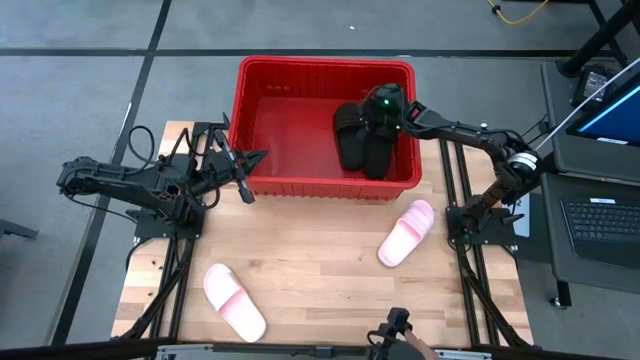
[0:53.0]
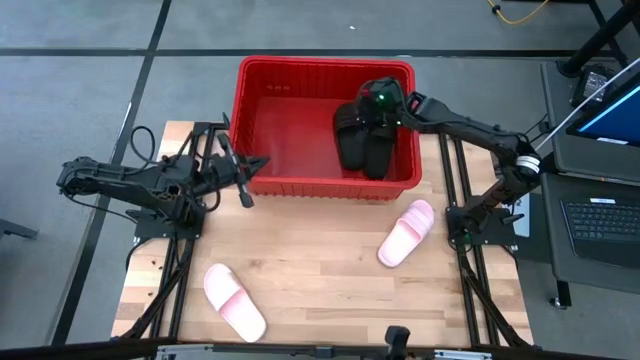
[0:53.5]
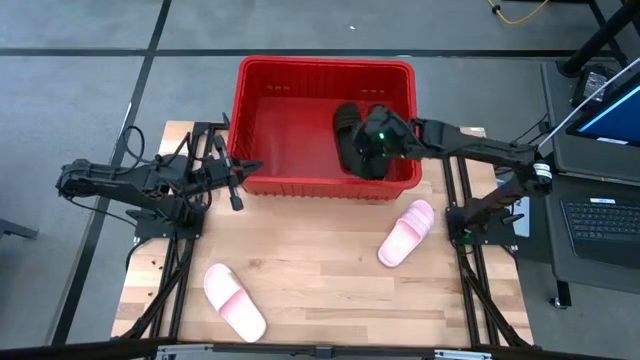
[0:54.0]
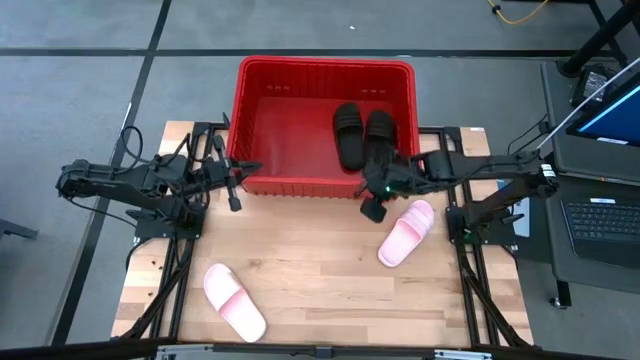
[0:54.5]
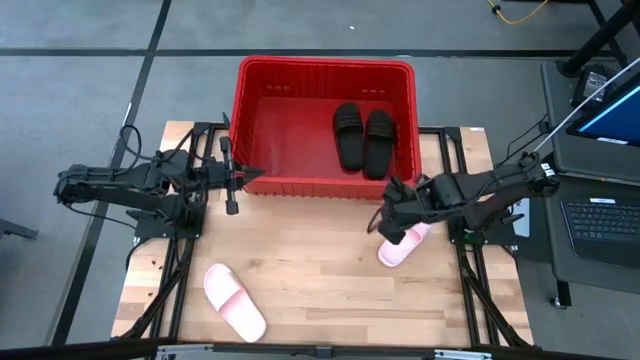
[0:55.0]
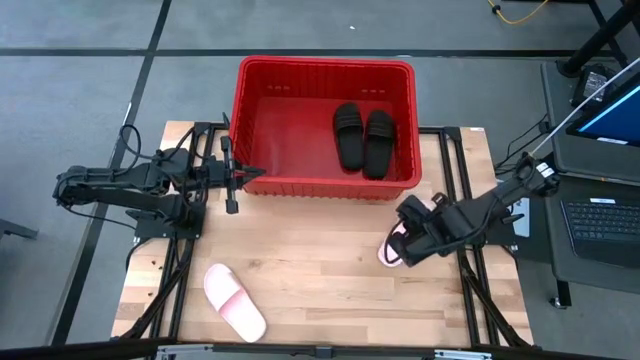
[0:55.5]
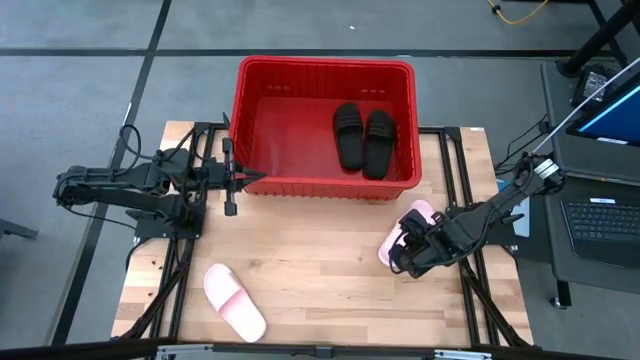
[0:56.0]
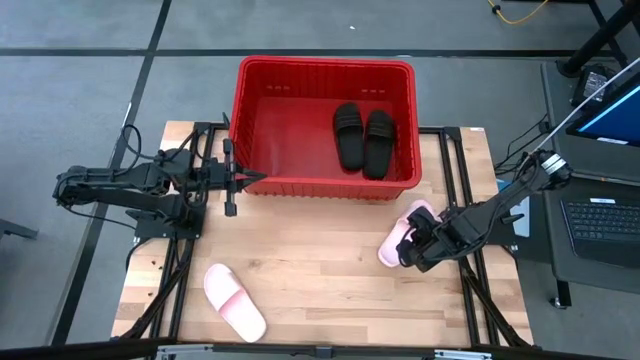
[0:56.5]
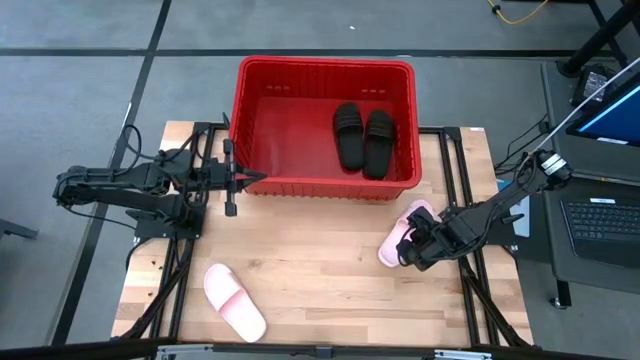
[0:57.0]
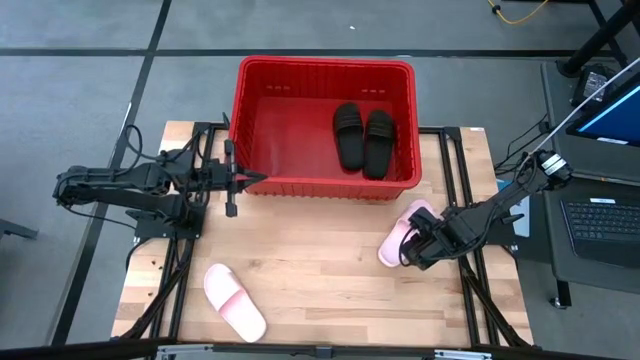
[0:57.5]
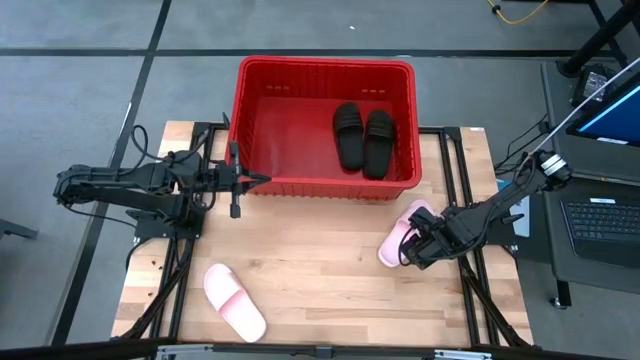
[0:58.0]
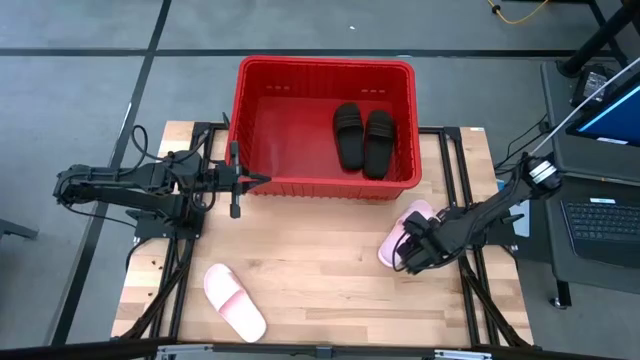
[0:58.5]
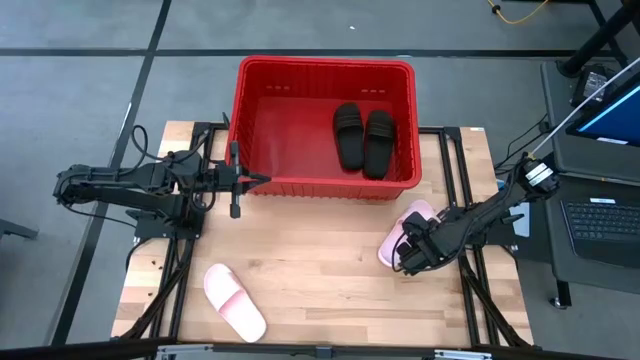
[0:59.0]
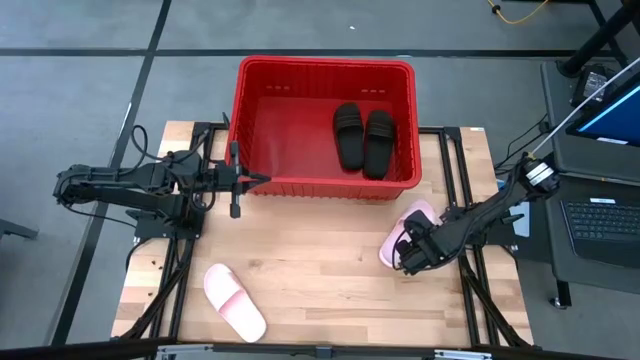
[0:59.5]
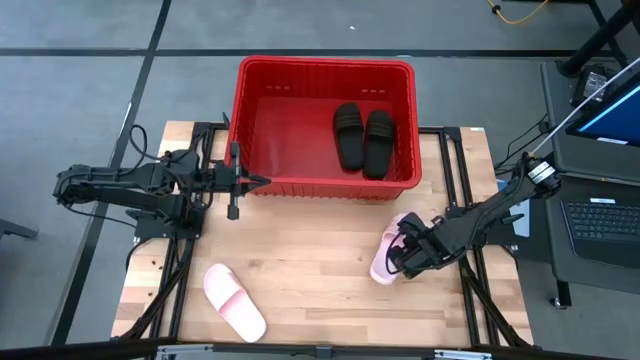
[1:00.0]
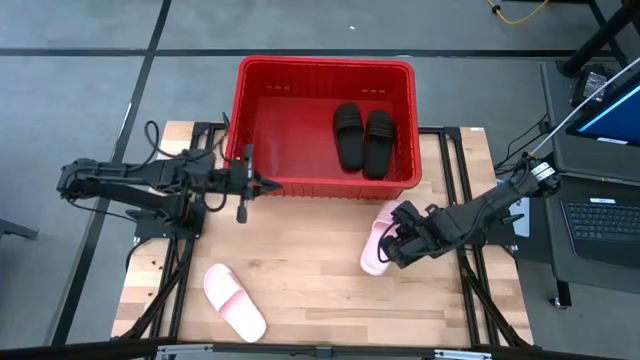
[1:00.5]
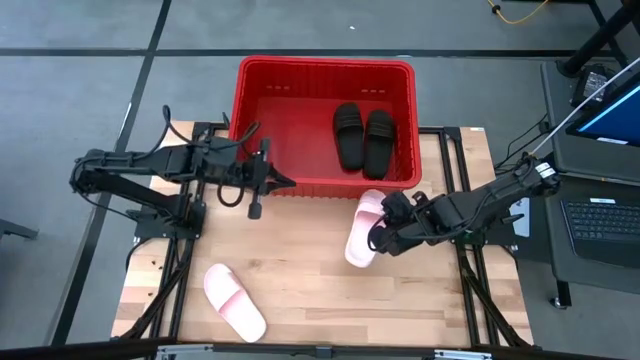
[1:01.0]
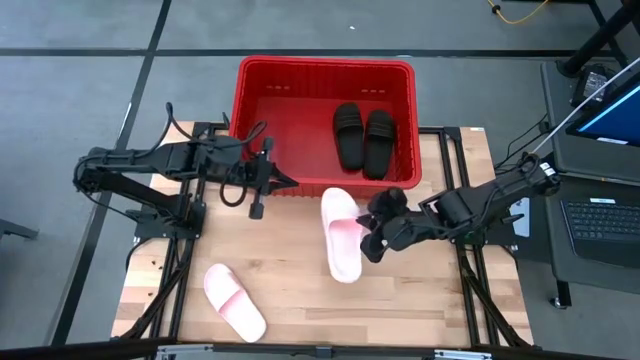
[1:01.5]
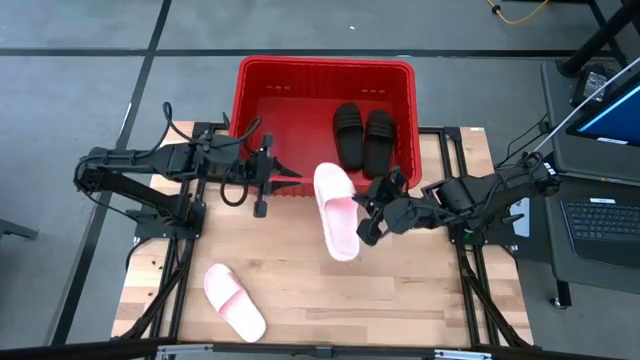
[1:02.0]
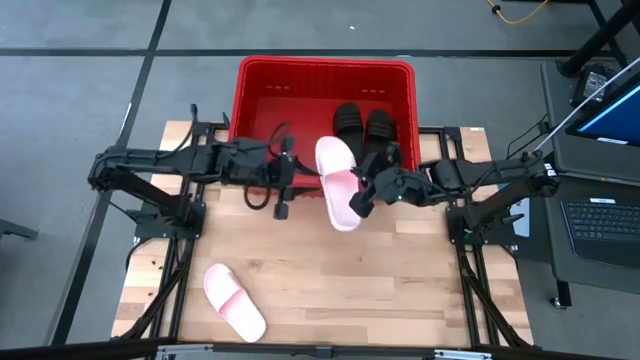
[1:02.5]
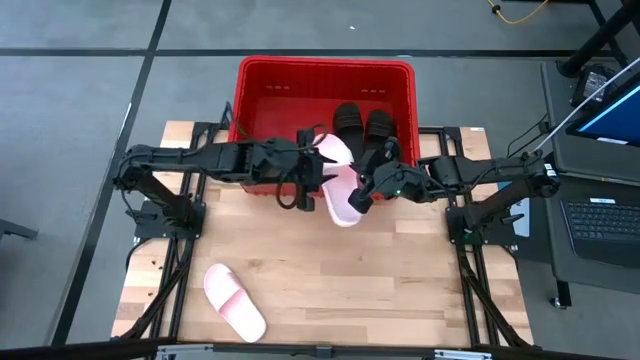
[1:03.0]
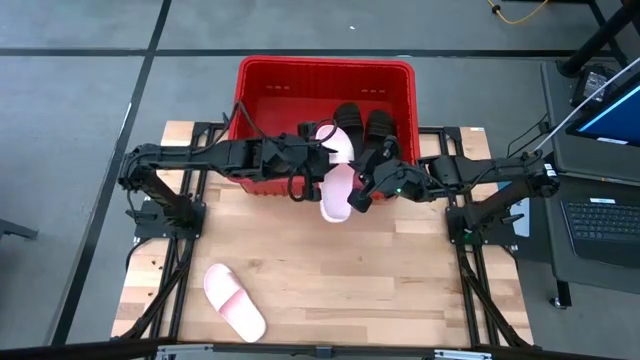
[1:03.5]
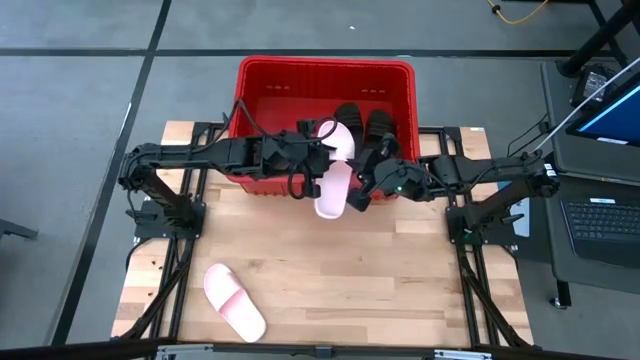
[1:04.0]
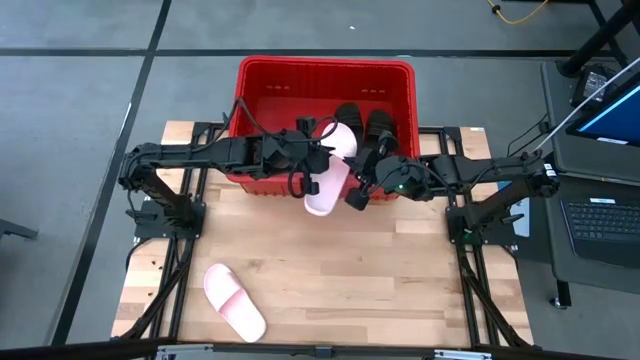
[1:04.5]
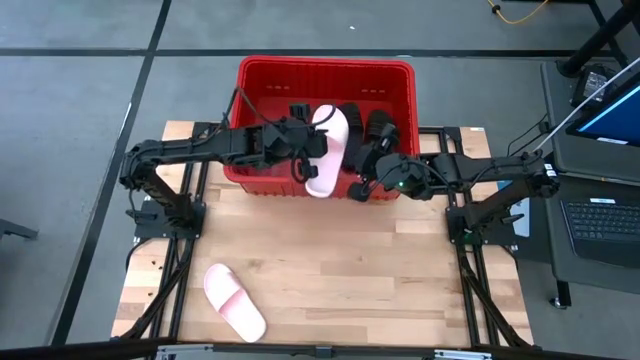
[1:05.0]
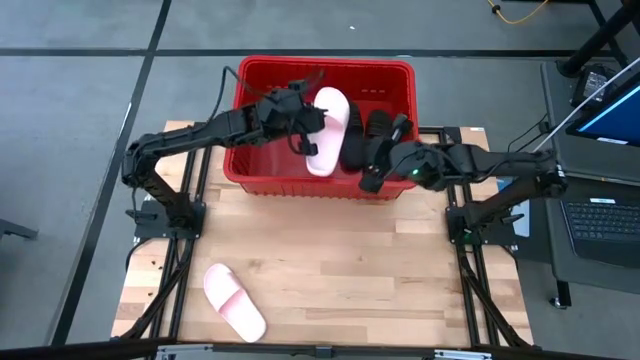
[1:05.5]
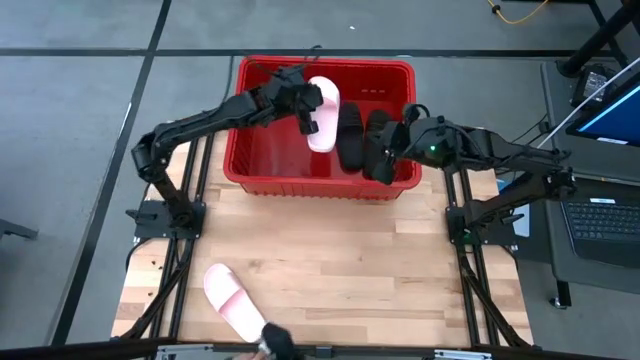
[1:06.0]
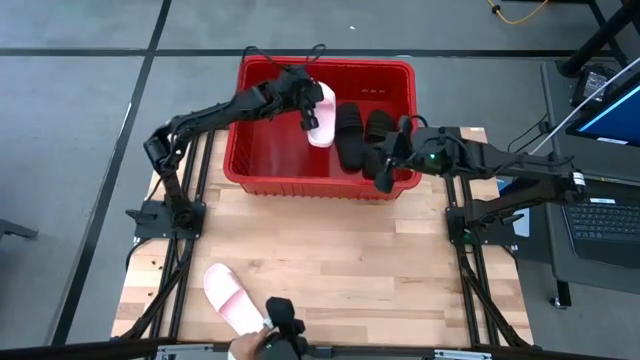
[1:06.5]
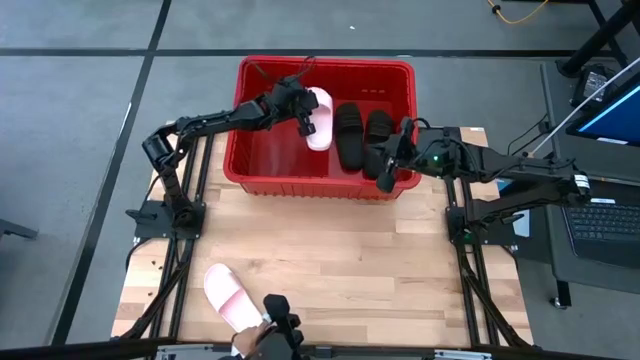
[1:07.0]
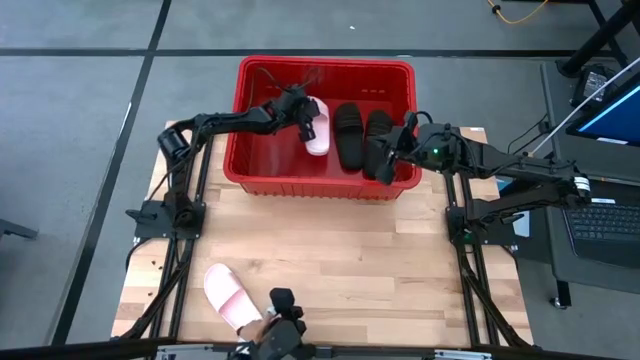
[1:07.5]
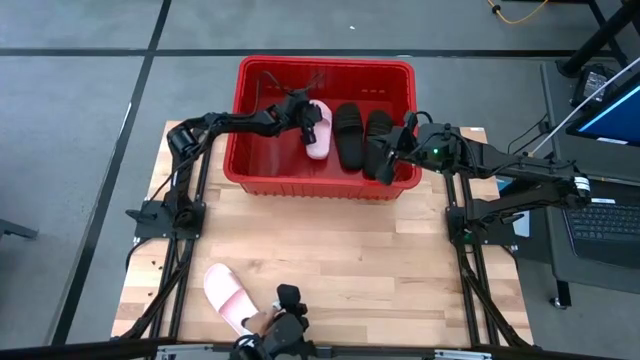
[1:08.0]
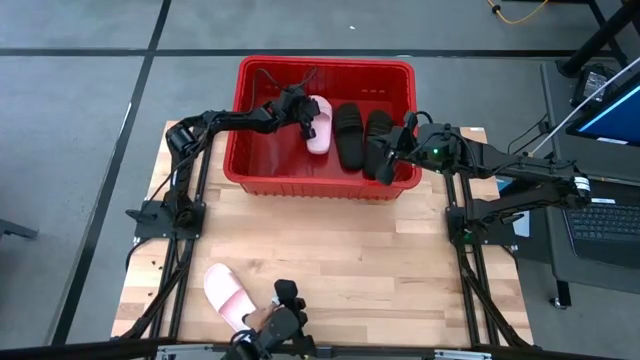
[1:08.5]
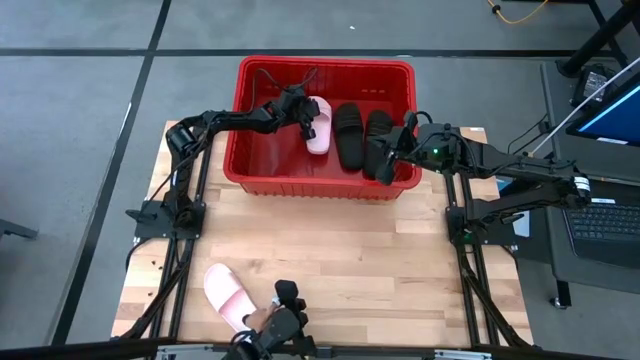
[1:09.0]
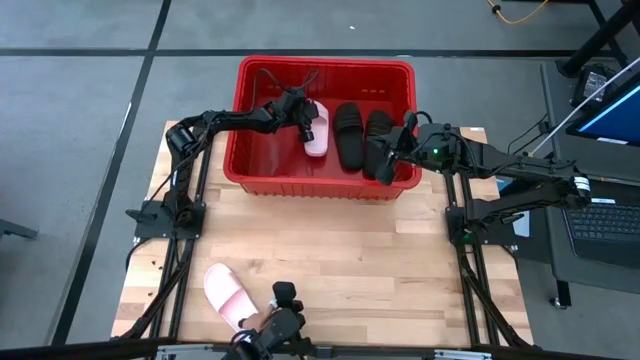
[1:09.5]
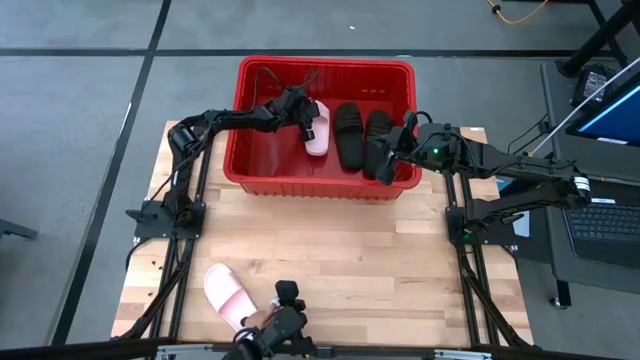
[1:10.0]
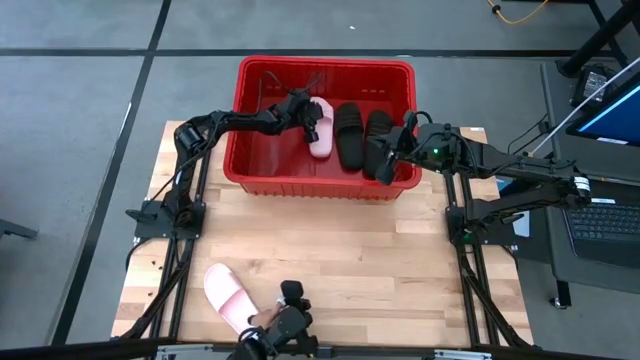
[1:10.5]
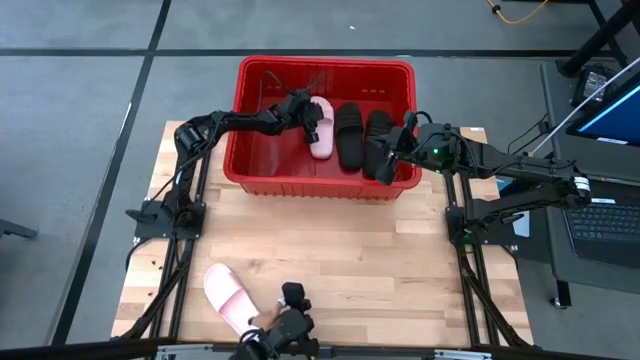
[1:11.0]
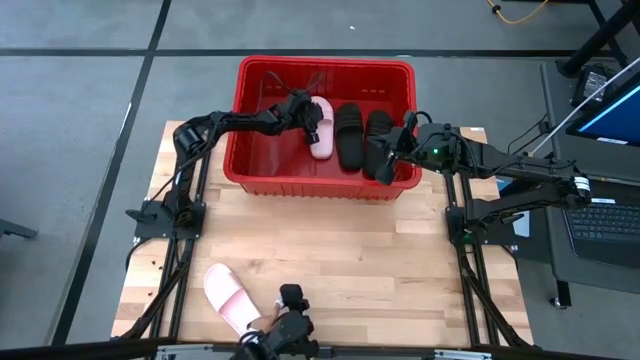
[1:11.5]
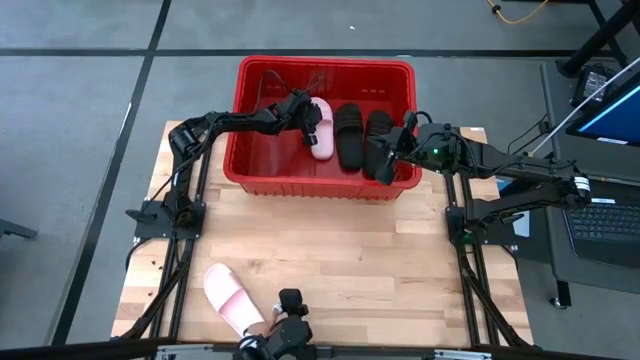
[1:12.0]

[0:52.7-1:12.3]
Task: Pick and place slides into bin
Put the right pink slide into the red bin

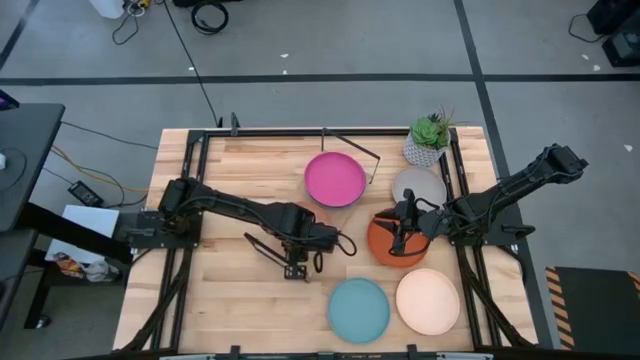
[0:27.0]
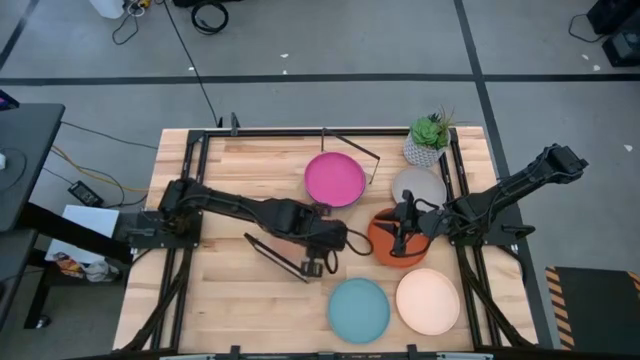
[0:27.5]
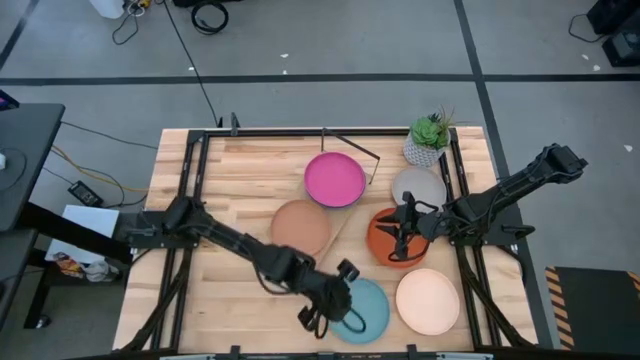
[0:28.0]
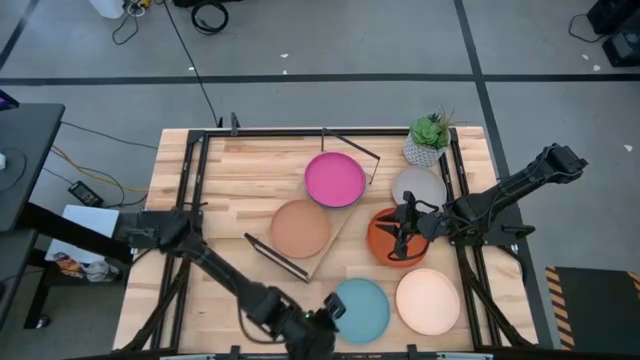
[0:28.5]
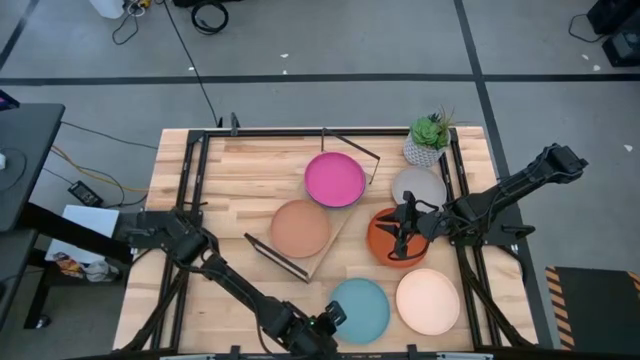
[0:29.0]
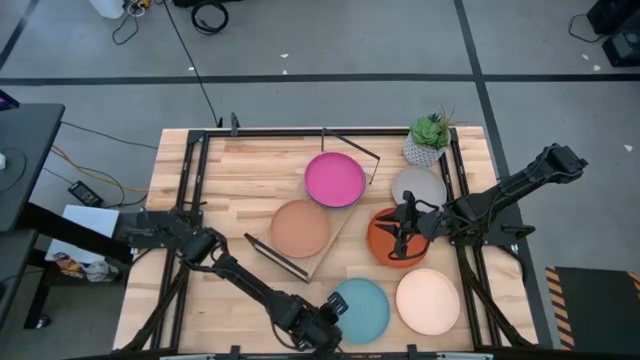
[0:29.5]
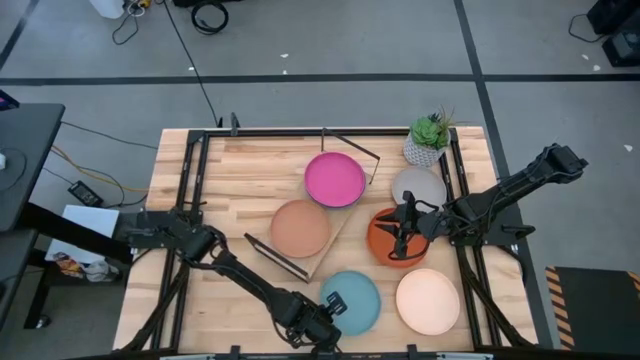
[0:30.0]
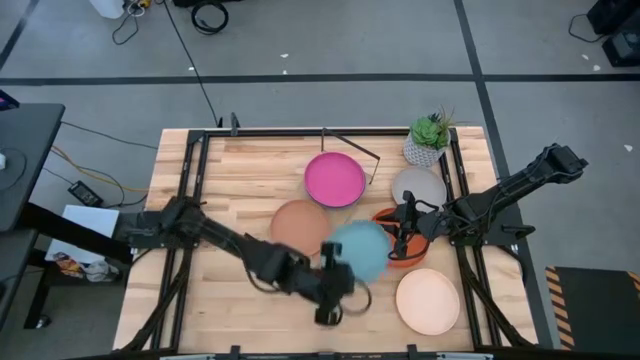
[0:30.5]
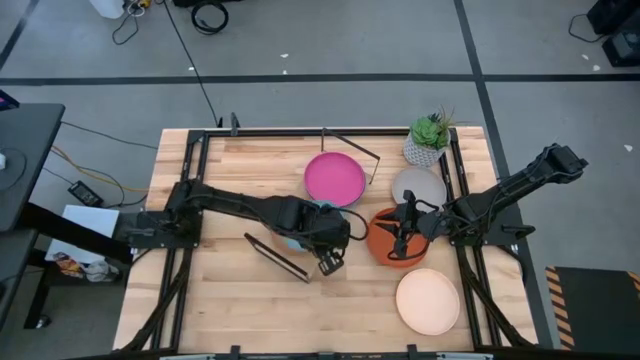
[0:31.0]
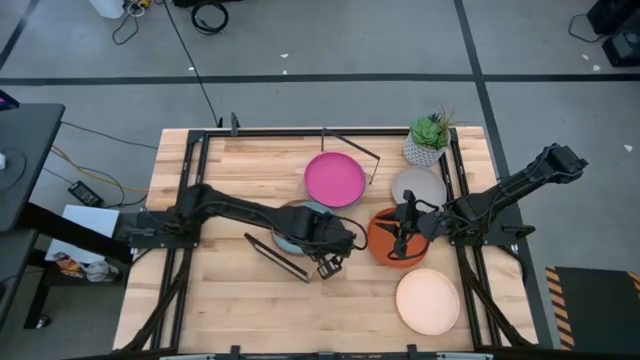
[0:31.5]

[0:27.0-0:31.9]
Task: Place and stack plates onto a shelf
Stack the light blue plate on top of the brown plate on the shelf
